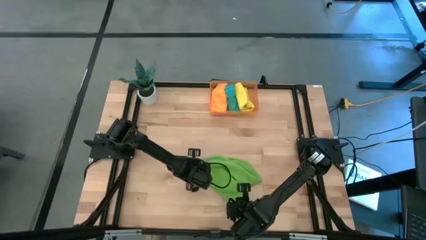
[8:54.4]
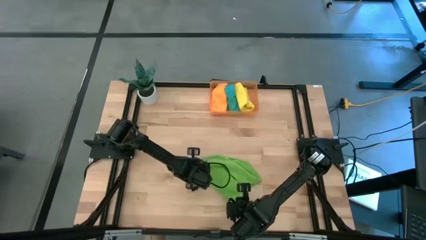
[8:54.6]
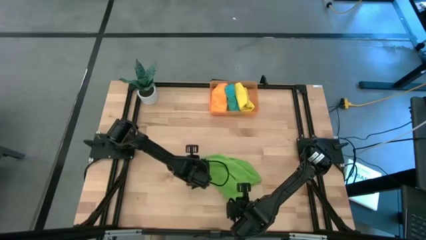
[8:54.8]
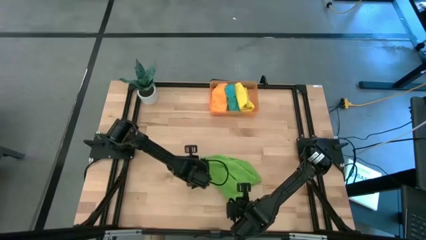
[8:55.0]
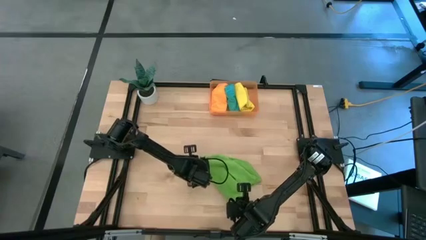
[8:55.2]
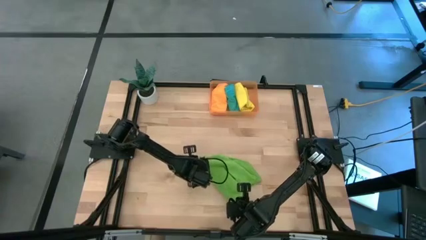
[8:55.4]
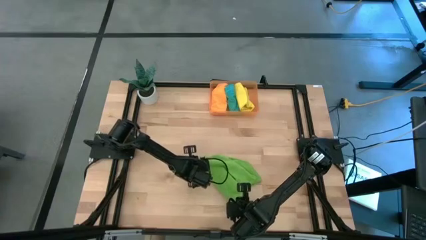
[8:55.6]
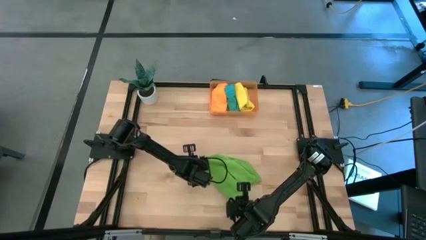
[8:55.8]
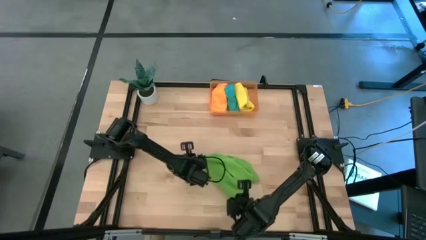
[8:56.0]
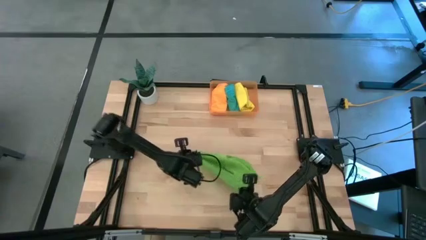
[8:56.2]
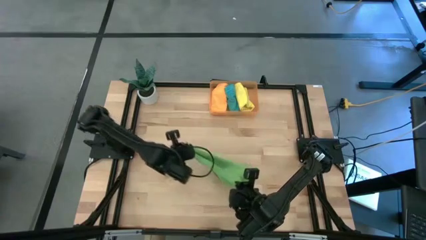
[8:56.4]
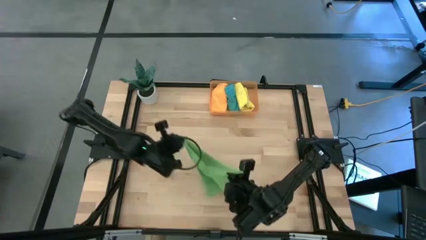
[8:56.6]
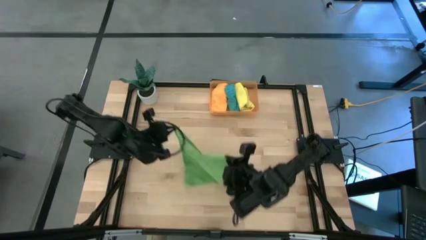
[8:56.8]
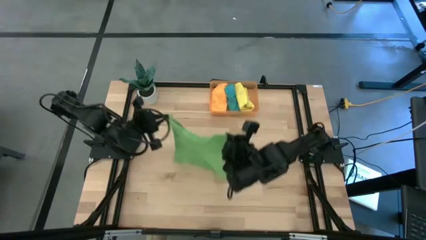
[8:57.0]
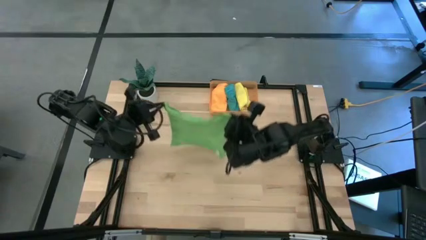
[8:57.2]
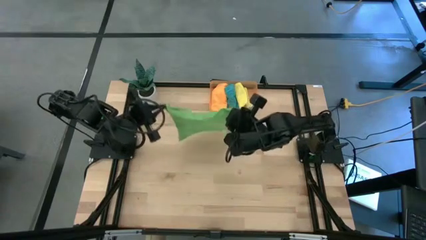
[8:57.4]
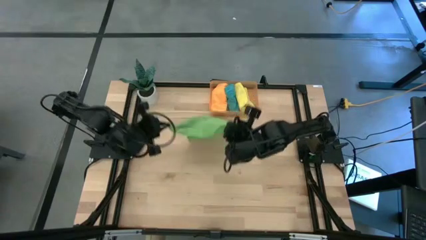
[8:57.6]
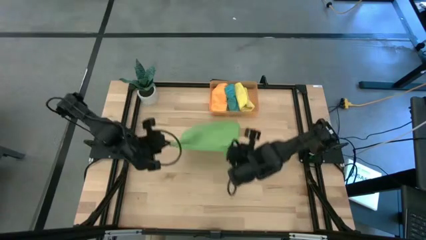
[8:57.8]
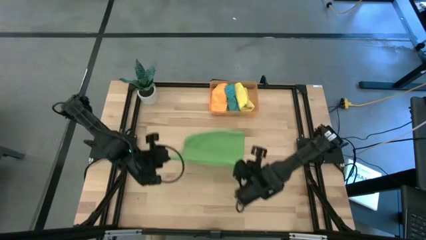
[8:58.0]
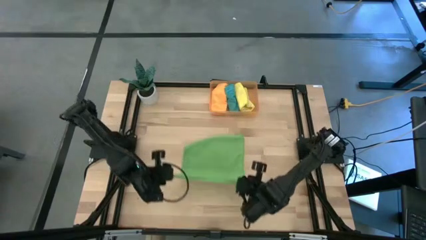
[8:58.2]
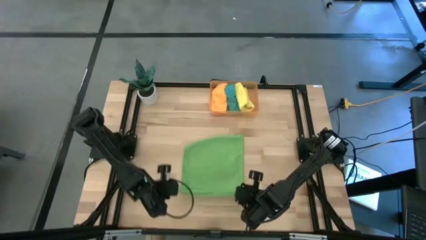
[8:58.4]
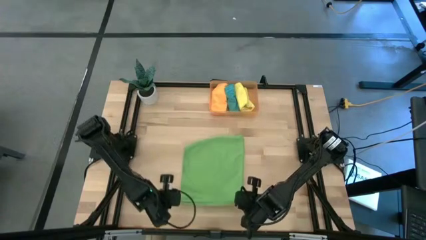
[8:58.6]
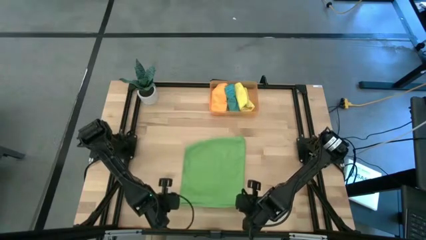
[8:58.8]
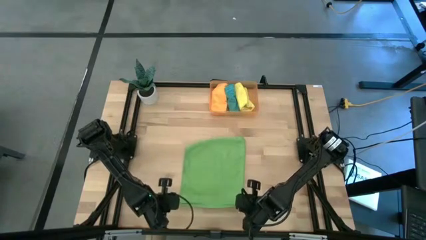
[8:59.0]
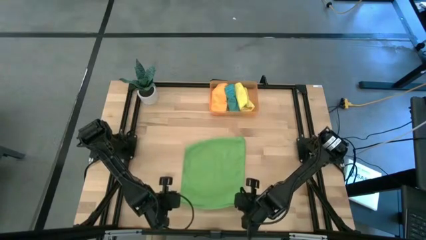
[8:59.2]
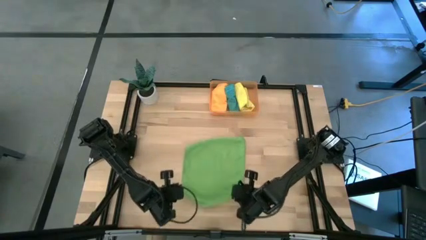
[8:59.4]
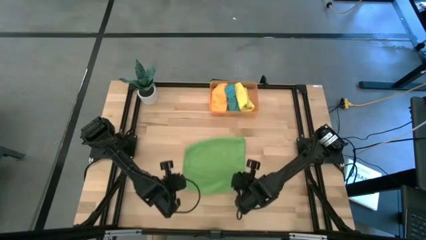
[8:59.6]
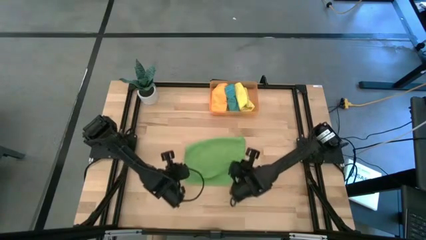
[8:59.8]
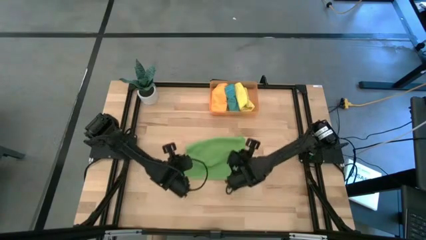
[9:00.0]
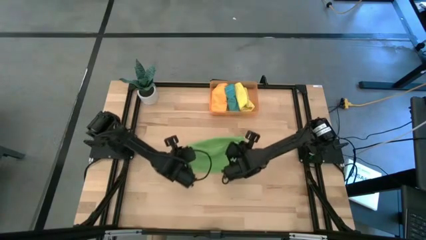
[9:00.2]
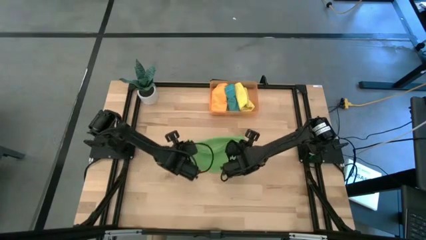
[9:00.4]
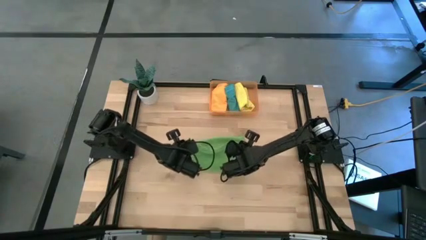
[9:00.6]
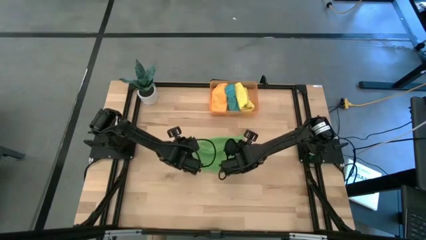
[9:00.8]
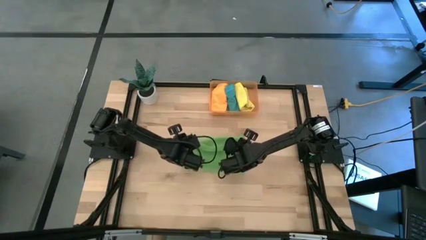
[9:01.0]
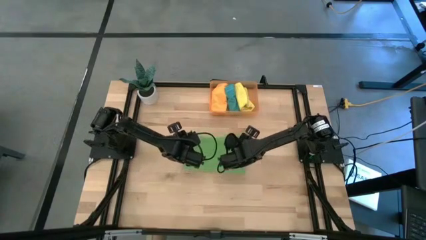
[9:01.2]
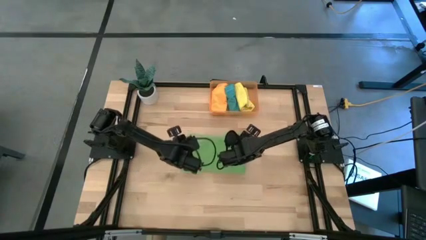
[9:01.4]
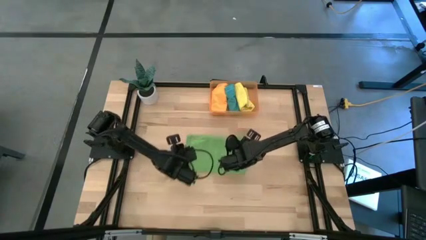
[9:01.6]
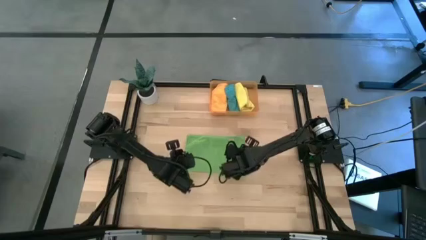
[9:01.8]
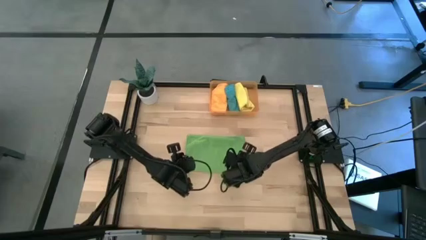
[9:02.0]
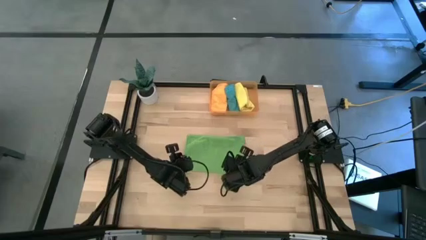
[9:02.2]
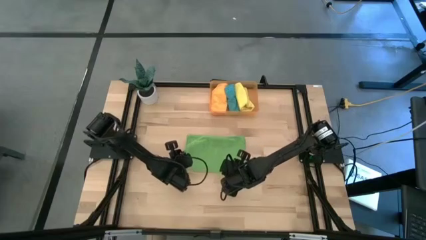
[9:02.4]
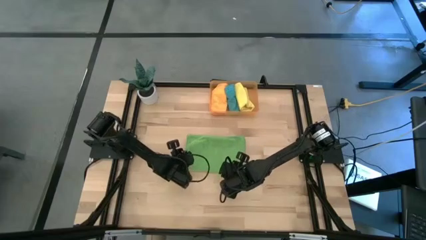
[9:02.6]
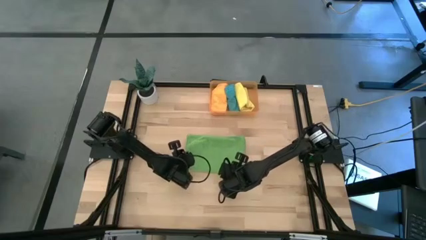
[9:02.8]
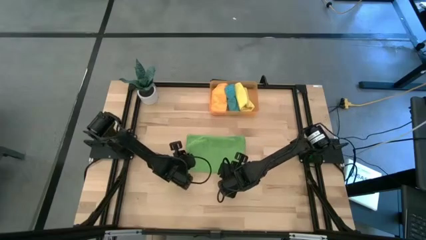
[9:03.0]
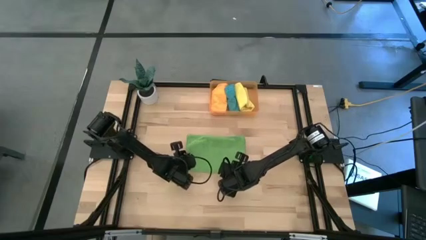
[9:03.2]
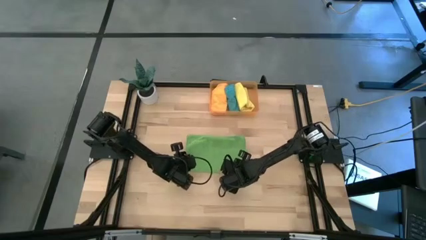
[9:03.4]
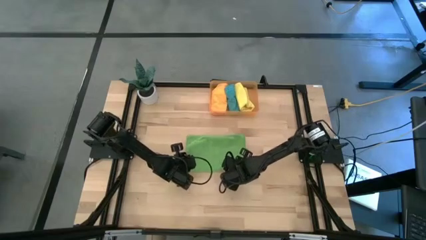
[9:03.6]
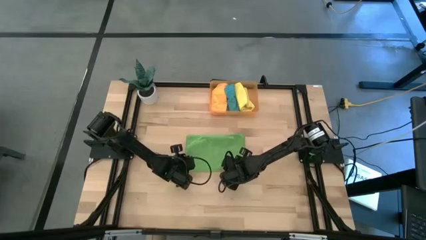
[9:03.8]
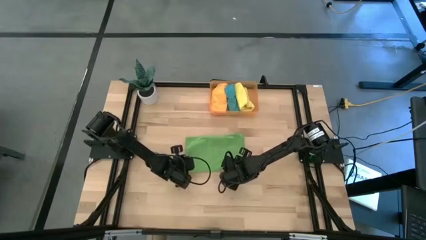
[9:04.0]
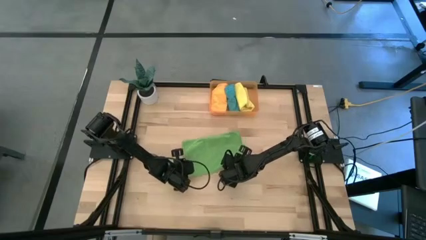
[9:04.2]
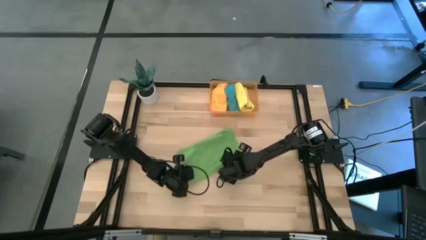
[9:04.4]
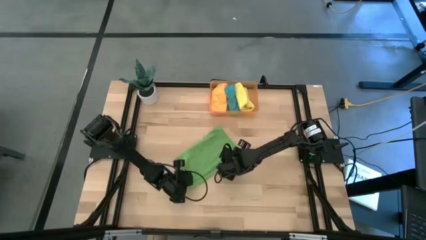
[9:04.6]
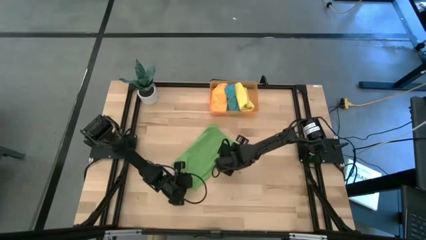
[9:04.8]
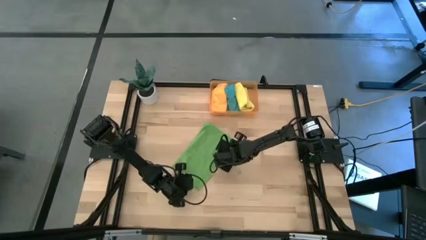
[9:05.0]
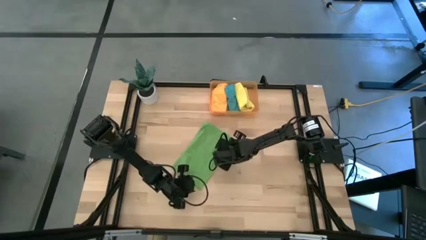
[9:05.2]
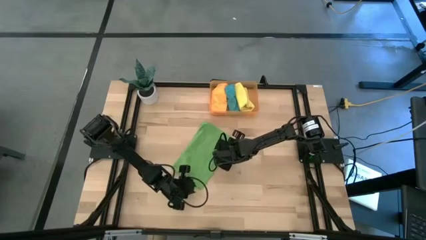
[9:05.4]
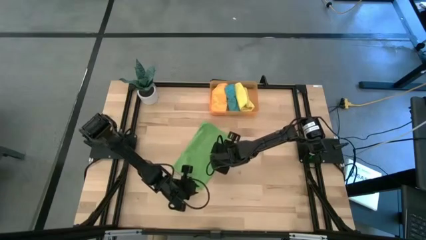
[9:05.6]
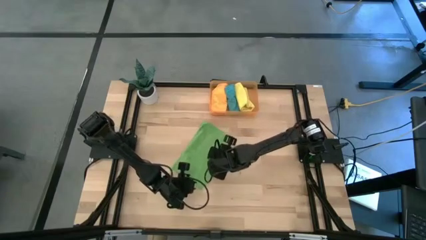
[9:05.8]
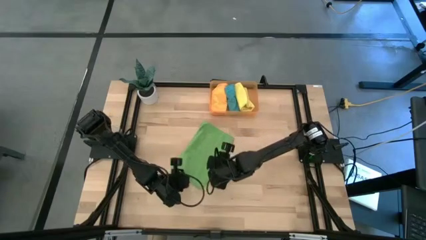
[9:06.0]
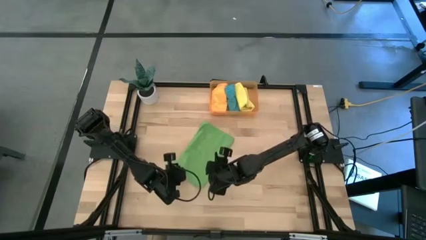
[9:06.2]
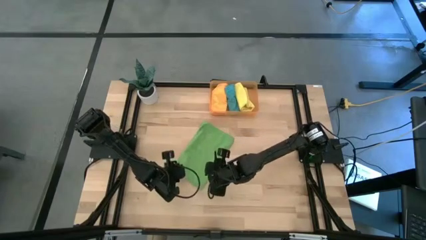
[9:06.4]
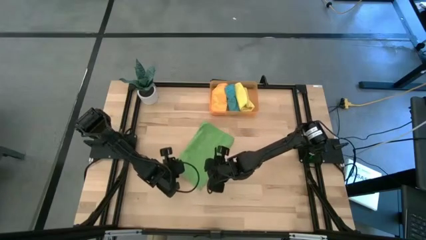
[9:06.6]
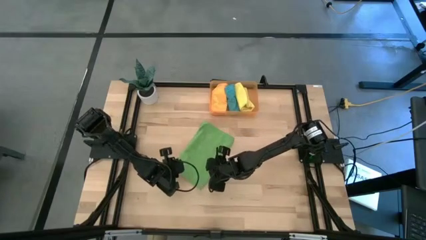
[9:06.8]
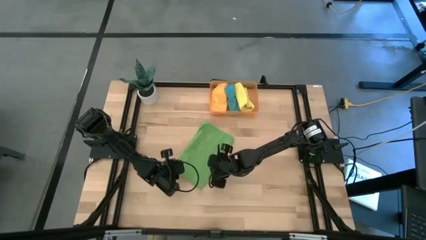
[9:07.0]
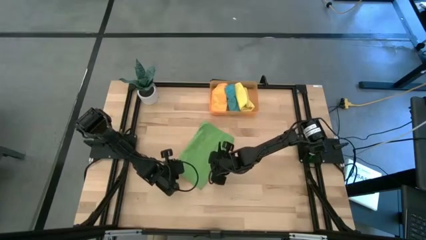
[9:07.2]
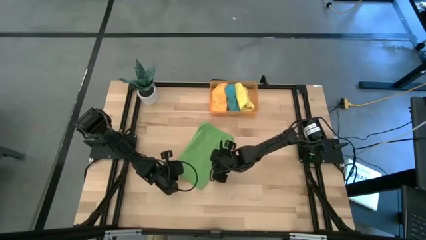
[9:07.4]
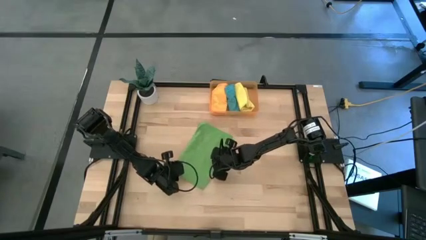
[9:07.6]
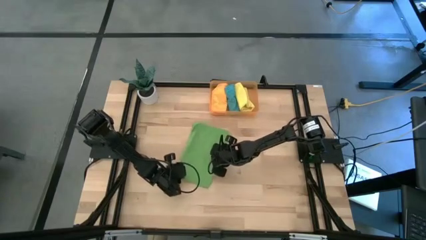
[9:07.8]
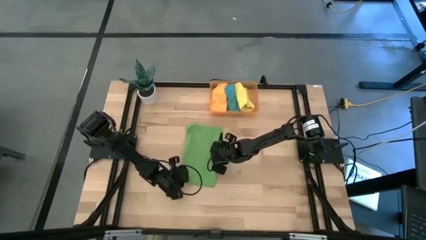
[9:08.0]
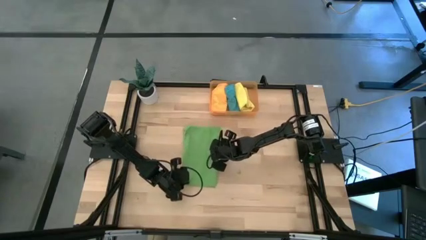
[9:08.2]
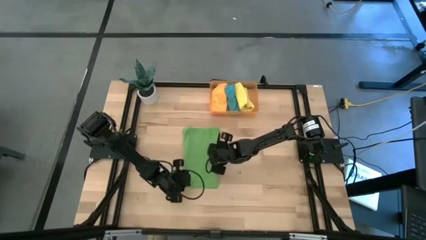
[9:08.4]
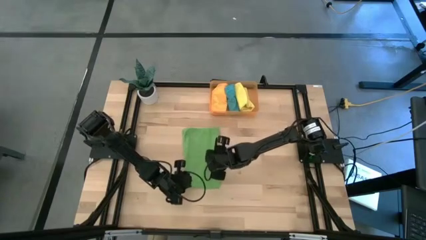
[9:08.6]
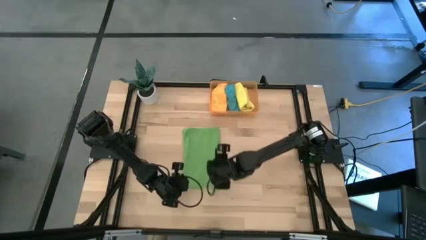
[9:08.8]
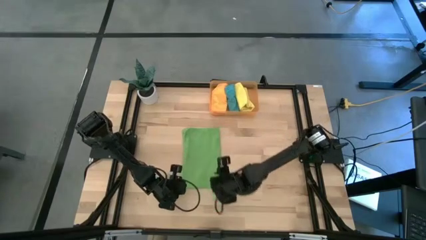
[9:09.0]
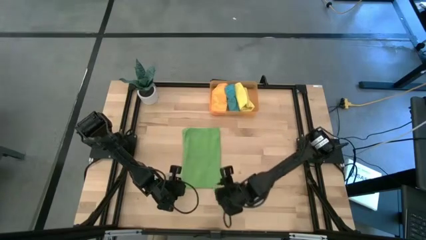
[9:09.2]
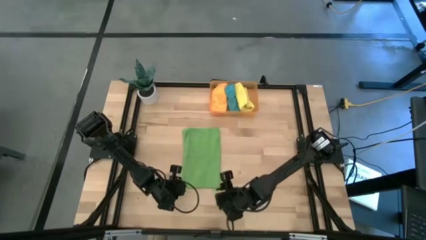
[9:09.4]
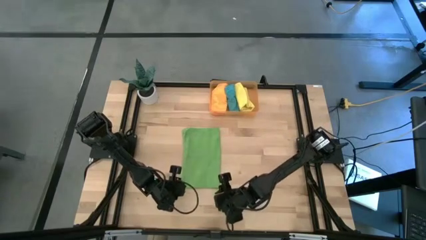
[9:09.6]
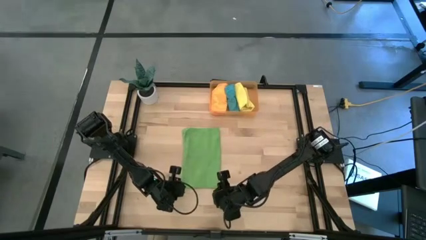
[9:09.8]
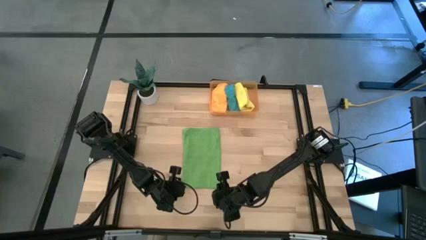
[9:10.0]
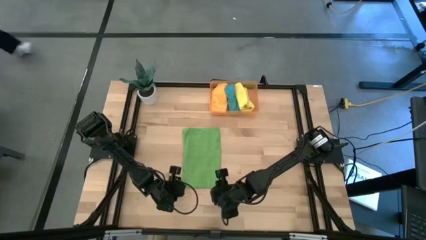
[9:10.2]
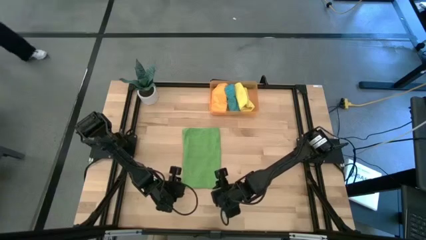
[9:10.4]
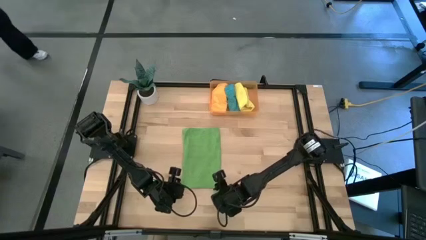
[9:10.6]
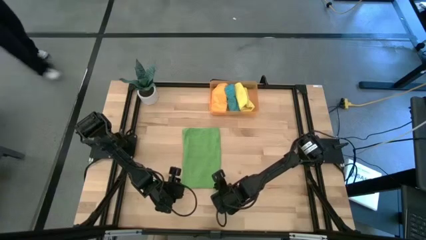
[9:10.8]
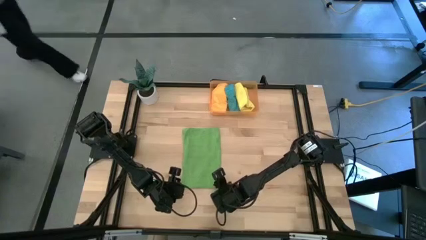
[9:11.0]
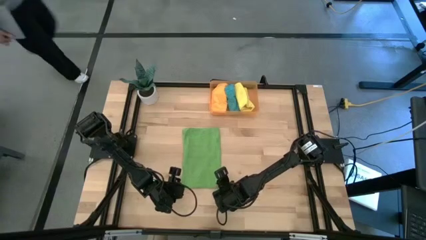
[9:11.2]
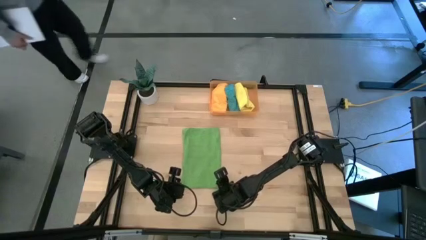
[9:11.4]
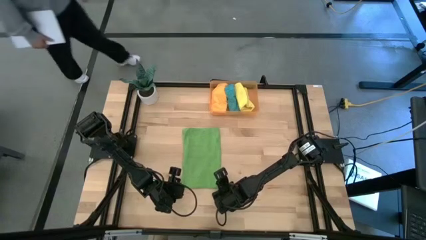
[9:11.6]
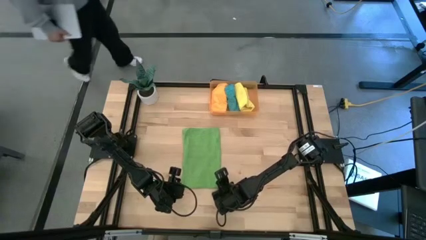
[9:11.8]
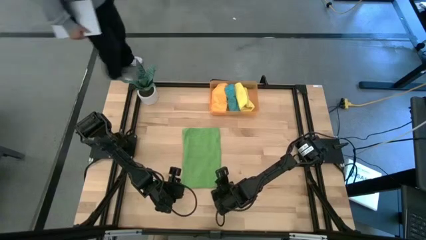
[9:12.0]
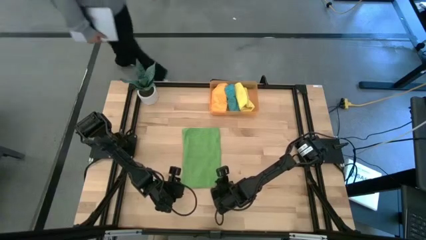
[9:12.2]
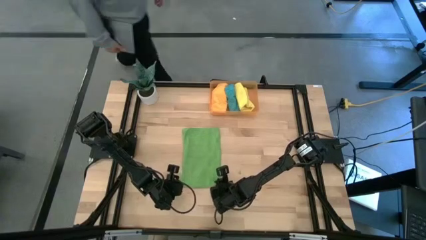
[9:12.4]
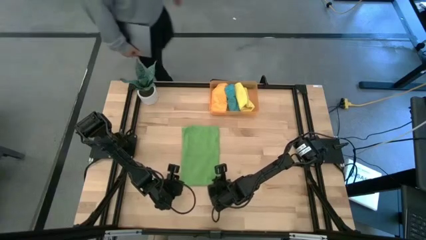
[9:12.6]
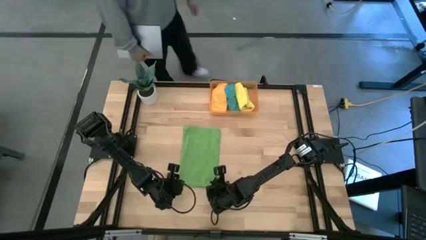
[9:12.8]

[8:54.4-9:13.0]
Task: Roll microfiber towels into tight, uniform cylinder then place into a basket
Roll the green microfiber towel
